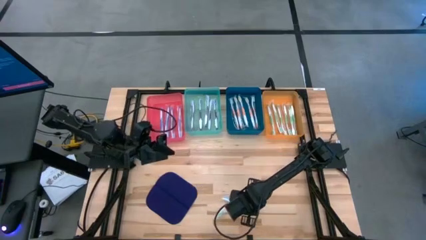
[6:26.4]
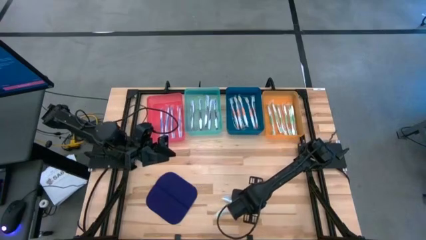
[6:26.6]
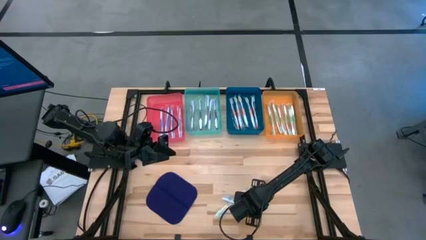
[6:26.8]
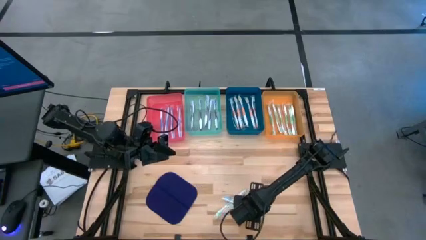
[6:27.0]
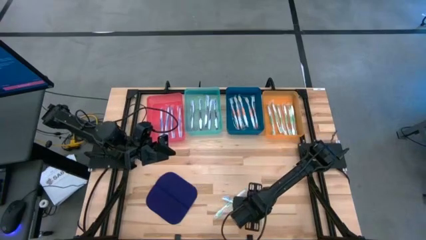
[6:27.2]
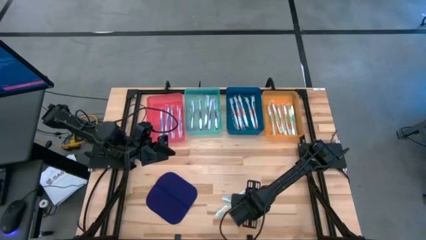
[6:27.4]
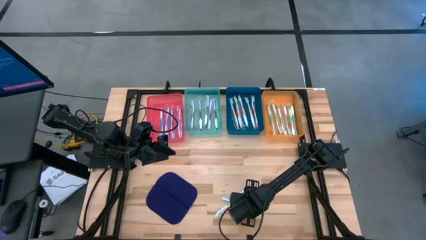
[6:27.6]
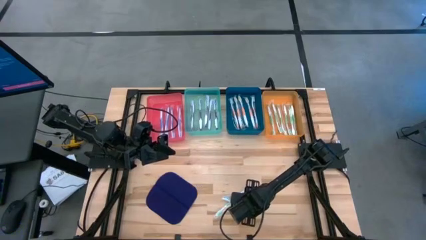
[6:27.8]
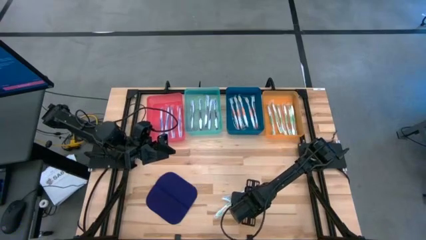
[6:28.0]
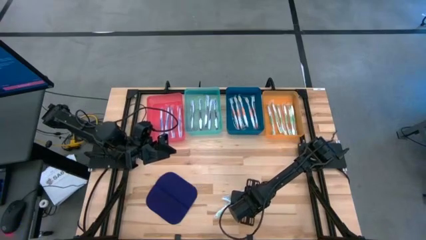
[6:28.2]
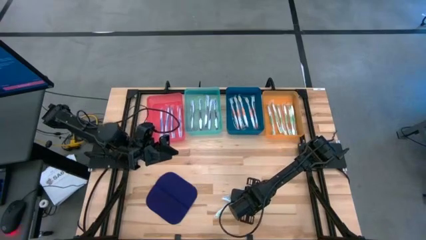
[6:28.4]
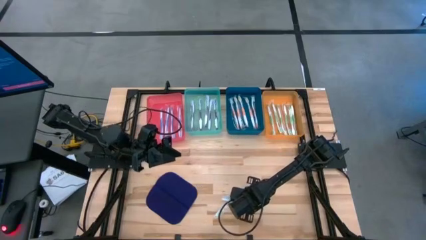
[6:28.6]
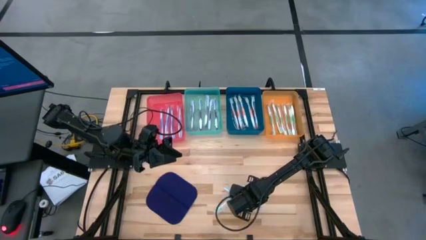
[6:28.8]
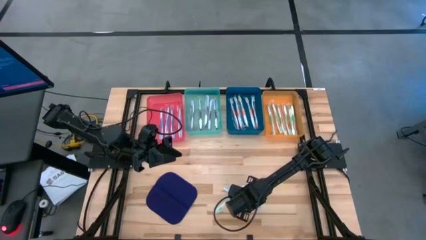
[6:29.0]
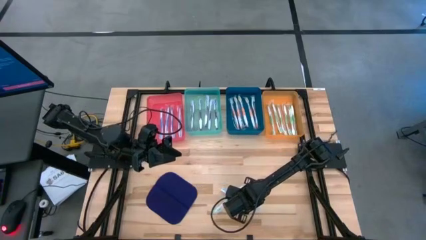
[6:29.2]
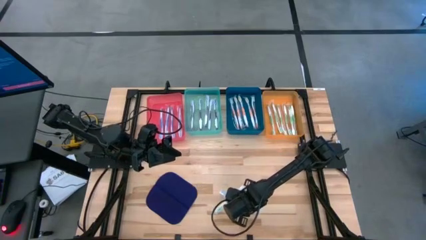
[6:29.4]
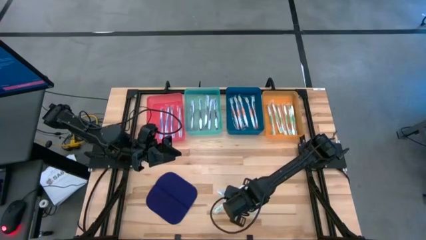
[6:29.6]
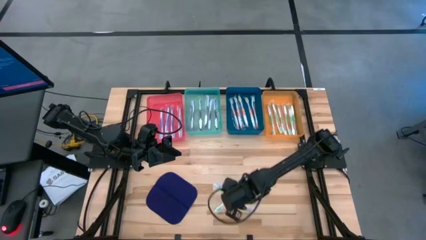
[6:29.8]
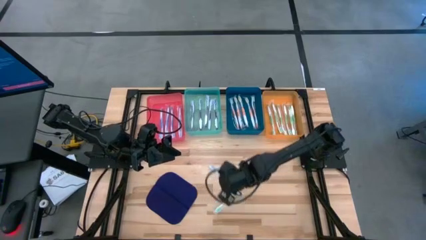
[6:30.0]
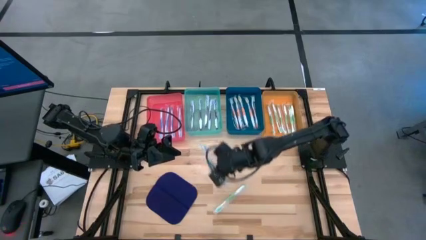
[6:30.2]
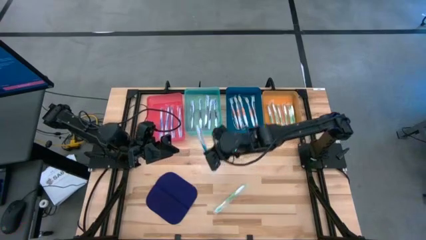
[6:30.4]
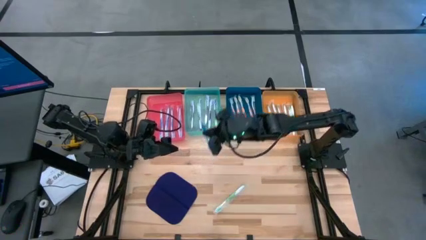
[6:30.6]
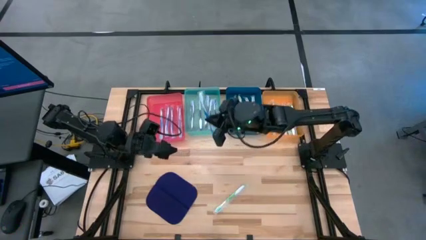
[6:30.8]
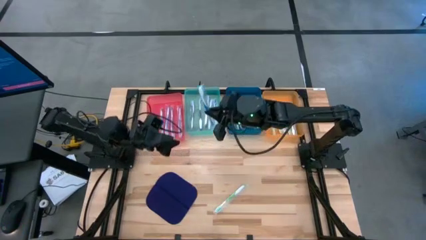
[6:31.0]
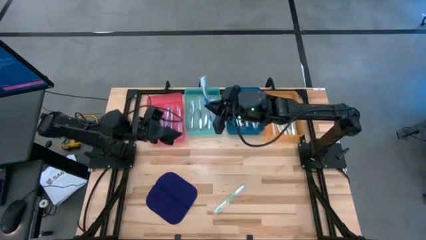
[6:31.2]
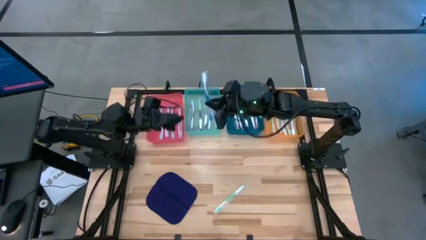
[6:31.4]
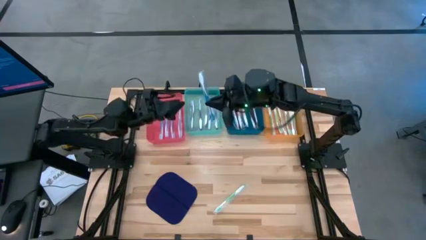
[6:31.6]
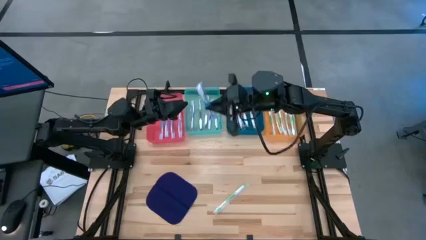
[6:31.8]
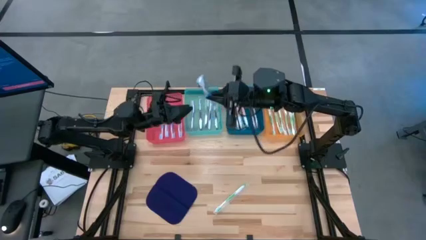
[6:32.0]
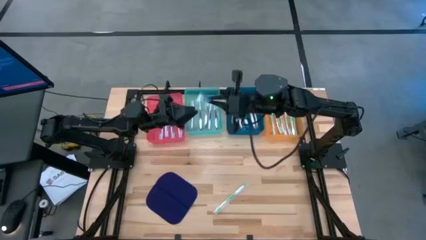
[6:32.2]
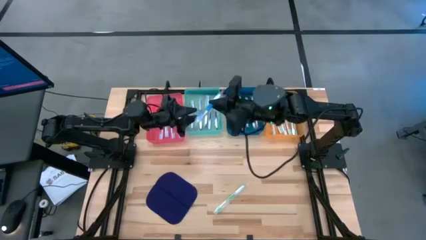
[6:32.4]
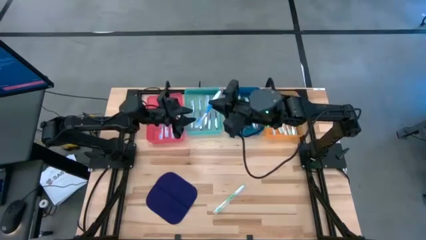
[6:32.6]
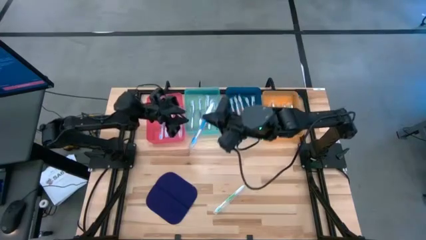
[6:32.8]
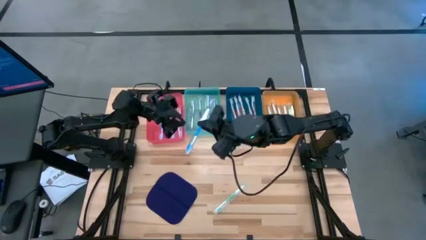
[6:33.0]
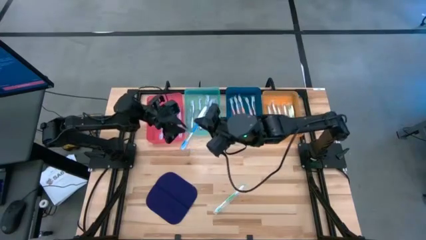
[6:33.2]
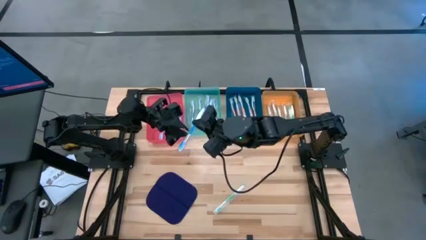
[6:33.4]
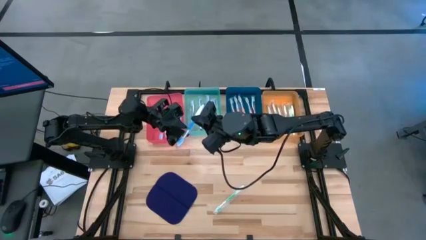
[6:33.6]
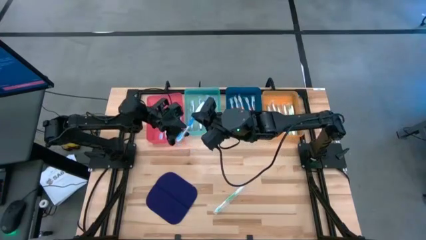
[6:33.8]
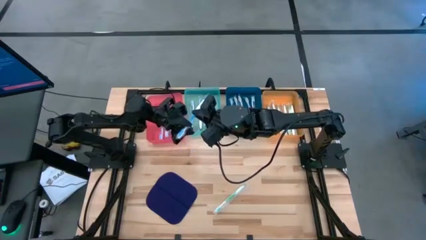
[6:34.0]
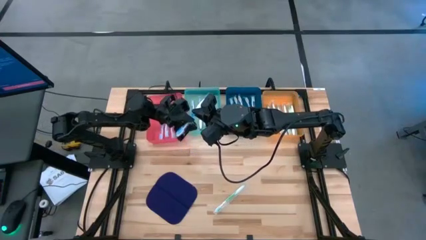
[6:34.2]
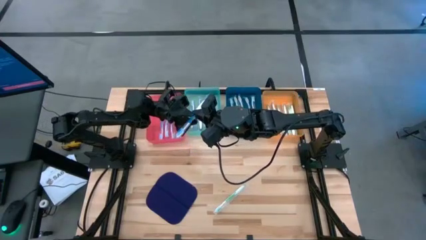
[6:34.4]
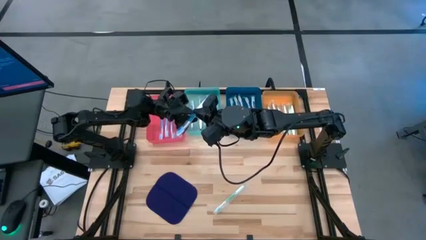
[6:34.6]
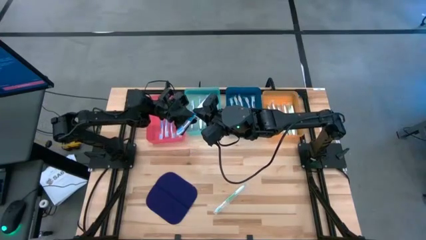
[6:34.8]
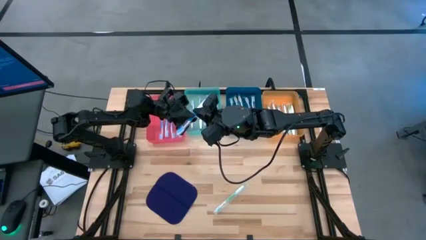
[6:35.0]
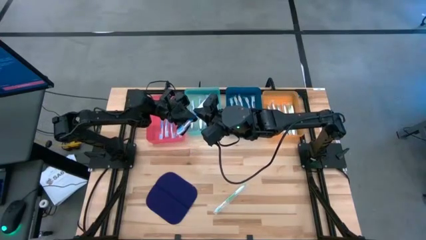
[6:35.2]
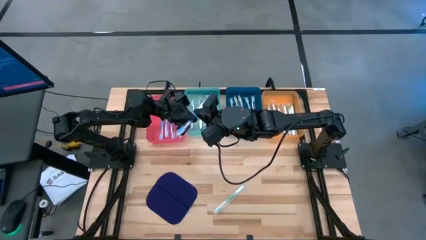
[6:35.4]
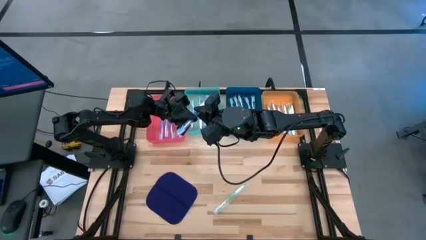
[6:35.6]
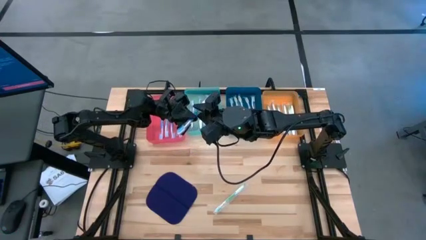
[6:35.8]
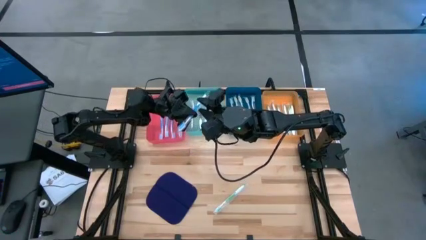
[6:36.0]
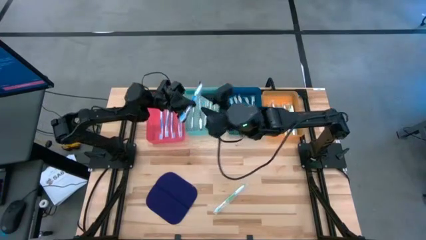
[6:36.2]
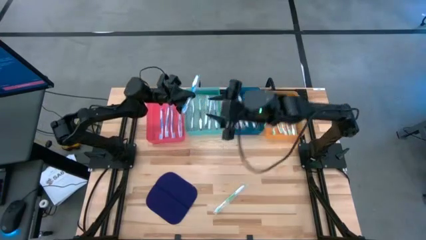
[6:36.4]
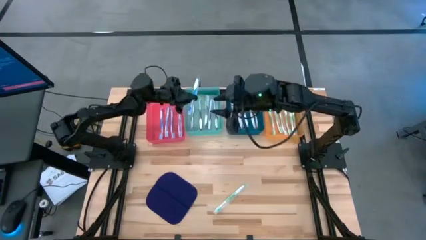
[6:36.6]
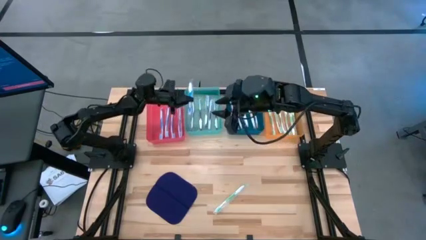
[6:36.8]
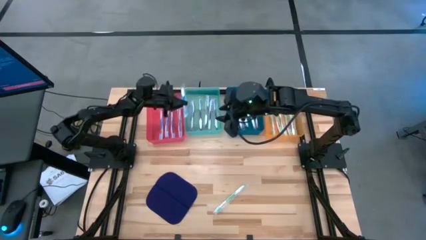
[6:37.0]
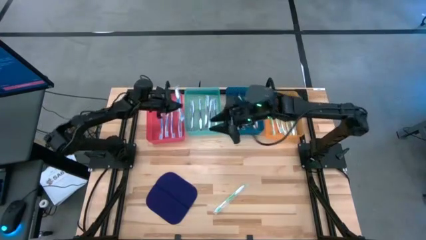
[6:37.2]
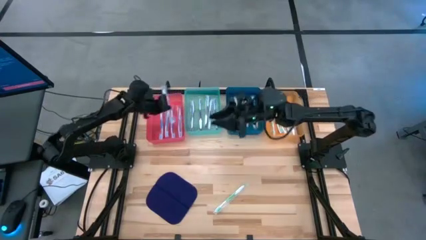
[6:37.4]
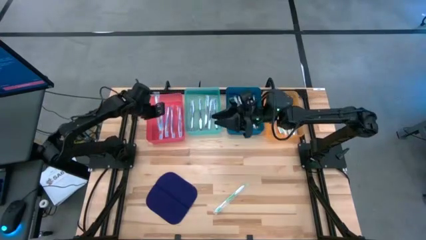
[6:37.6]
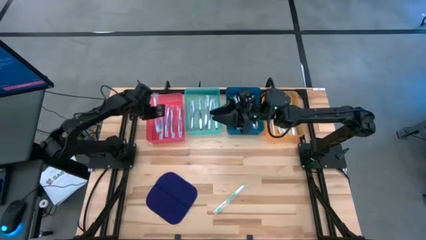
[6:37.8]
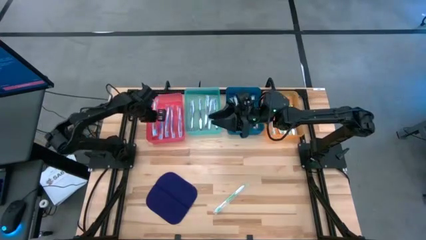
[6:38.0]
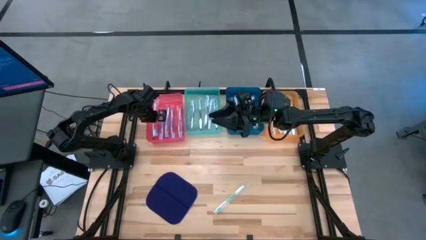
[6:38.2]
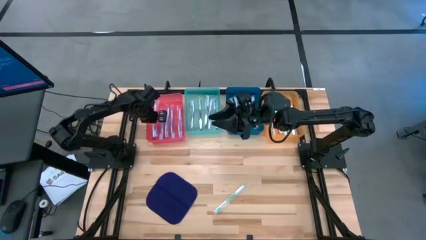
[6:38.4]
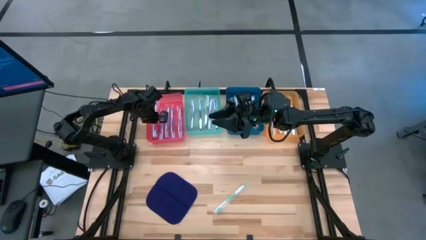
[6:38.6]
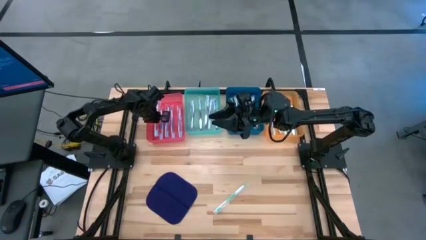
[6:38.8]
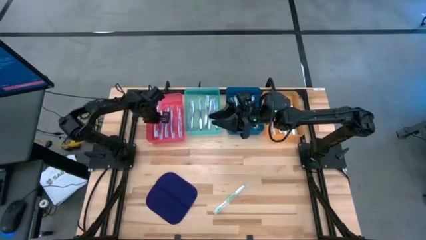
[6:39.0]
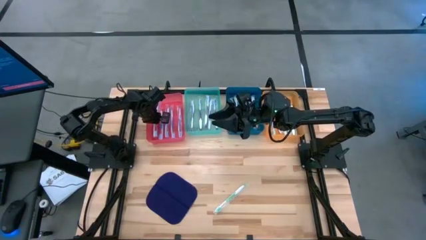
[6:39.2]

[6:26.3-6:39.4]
Task: Pick & Place Toothbrushes
Put the blue toothbrush into the red bin
